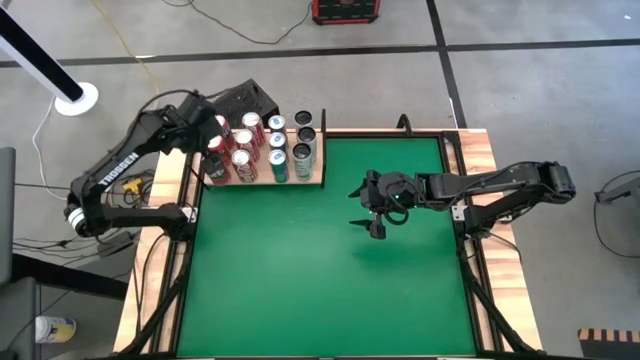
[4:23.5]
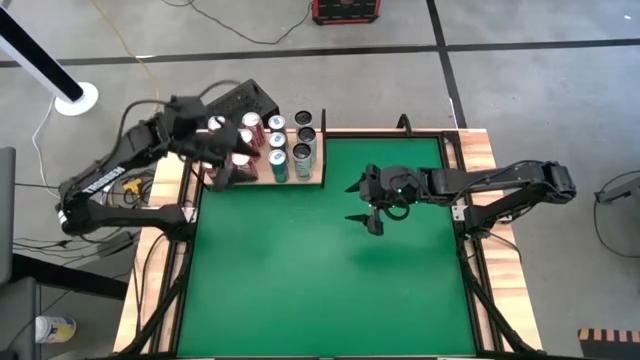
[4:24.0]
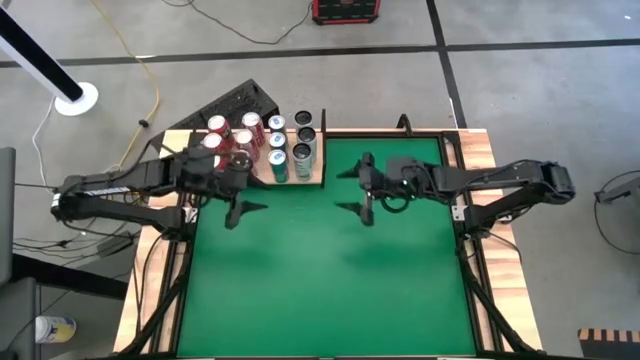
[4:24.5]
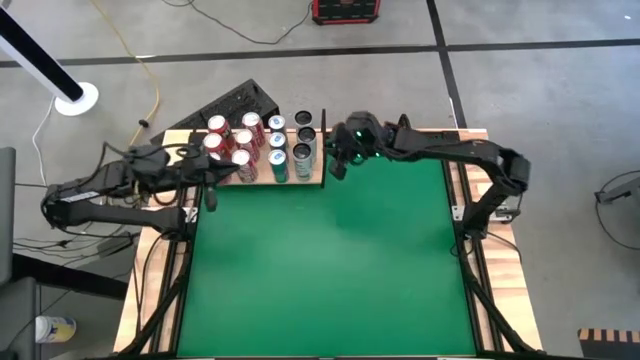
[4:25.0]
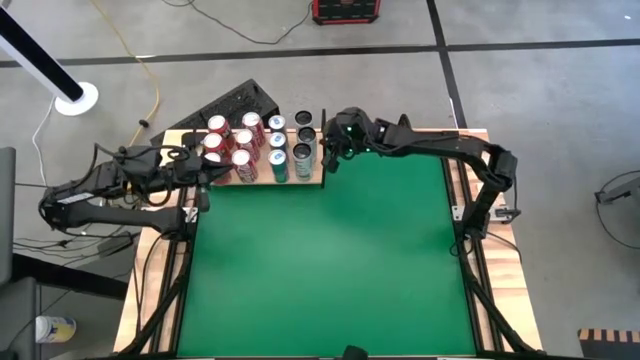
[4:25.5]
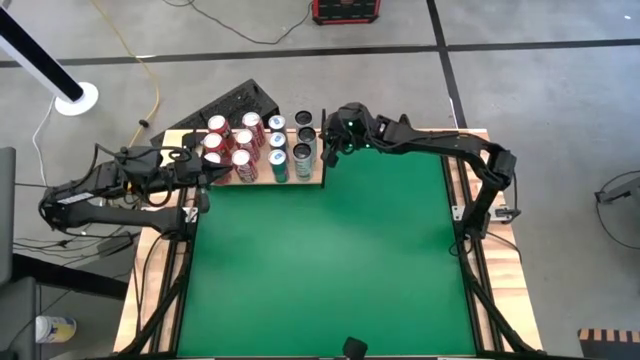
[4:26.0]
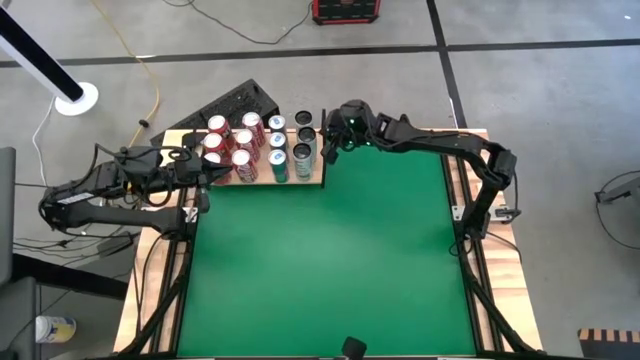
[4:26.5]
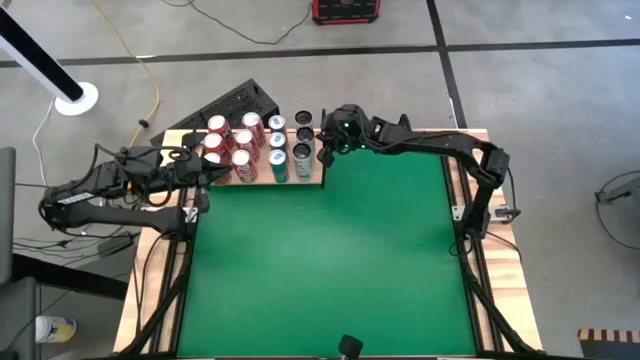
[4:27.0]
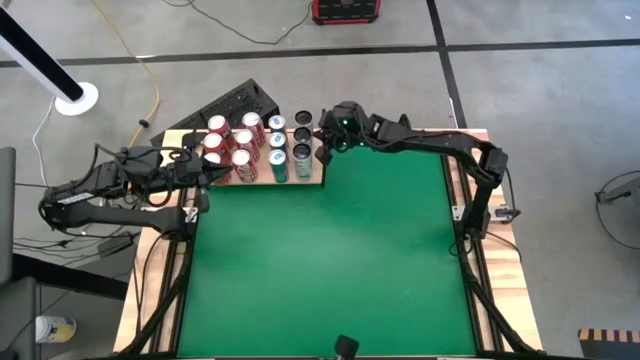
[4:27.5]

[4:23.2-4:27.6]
Task: Place canned beverage on shelf
Adjust the white and yellow soda can on the shelf

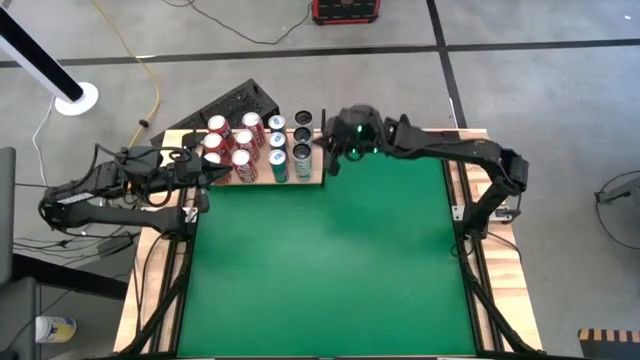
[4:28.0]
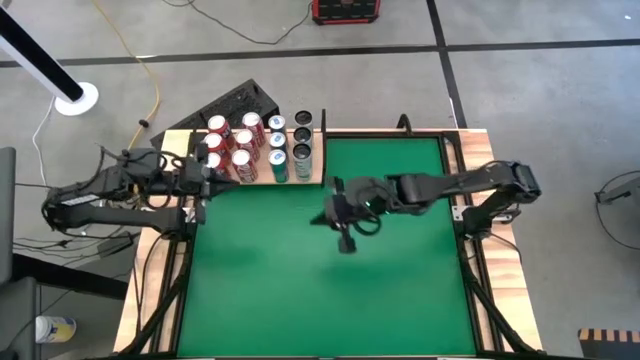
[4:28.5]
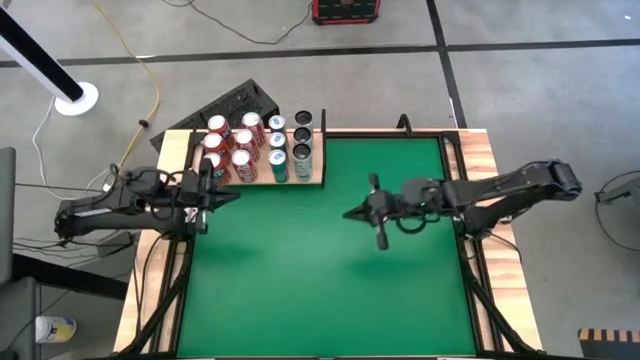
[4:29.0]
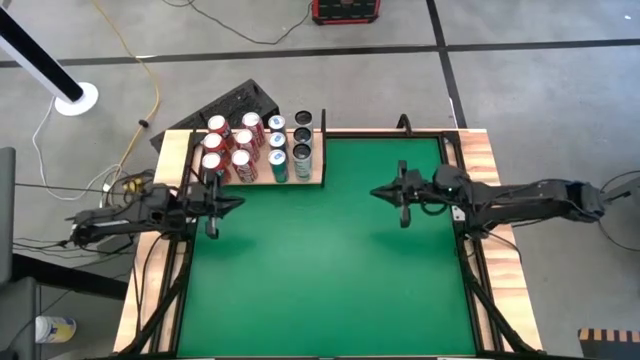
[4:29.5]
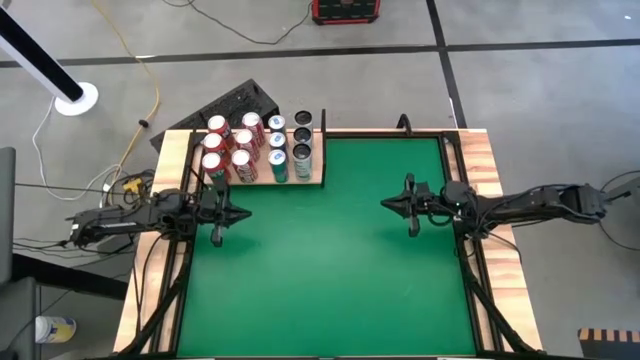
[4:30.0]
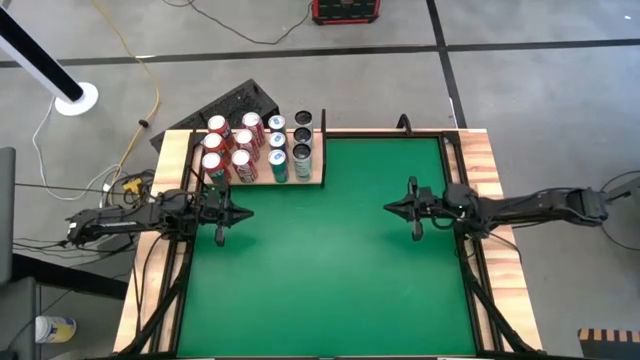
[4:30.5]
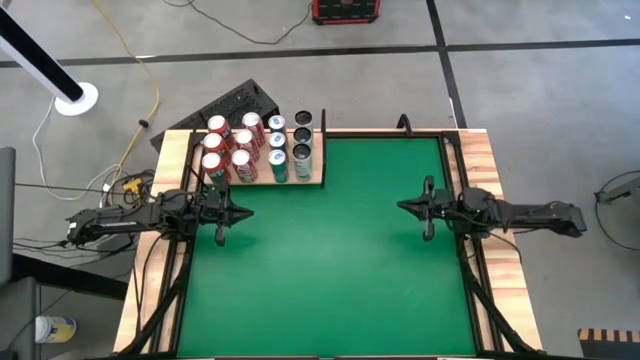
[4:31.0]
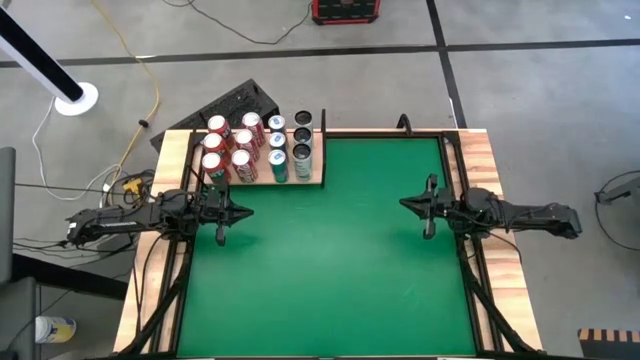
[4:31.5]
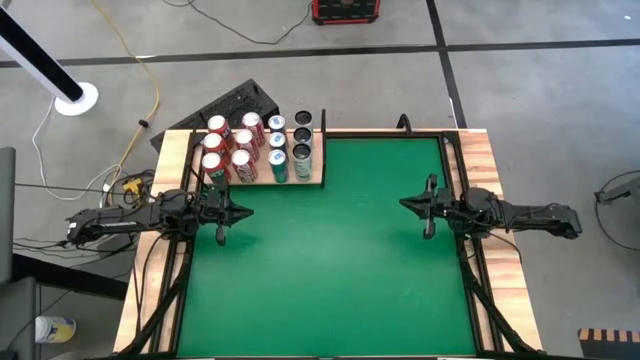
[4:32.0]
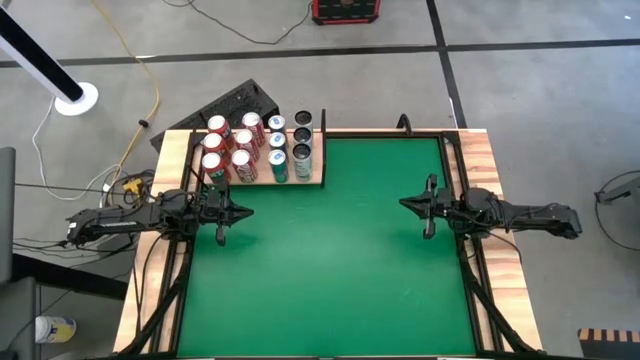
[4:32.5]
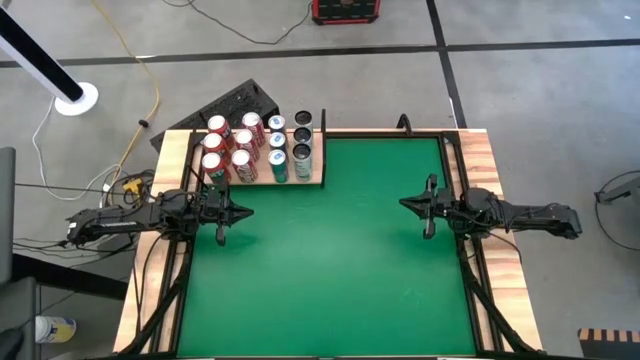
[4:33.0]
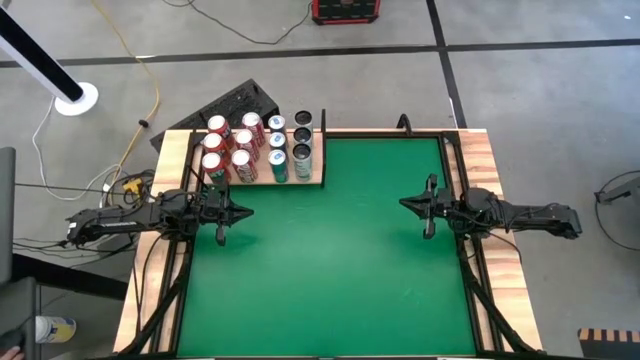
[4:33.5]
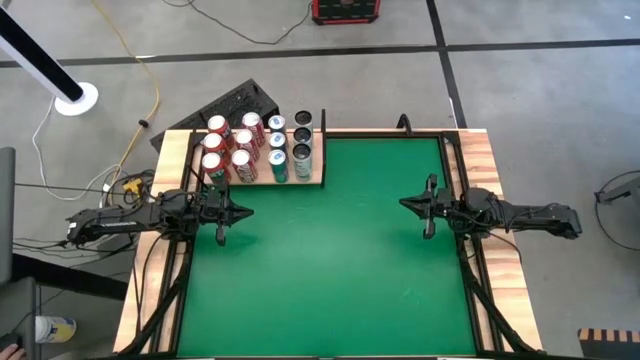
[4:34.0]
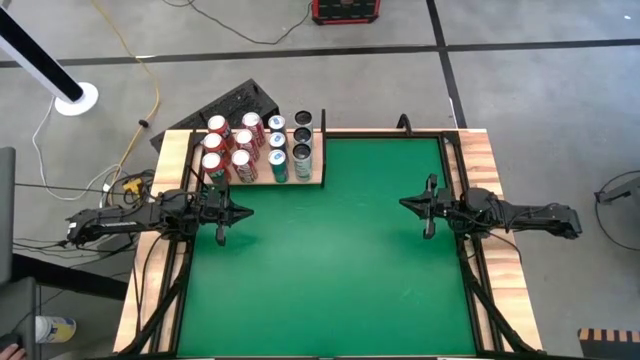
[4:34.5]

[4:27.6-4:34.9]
Return to Home Position

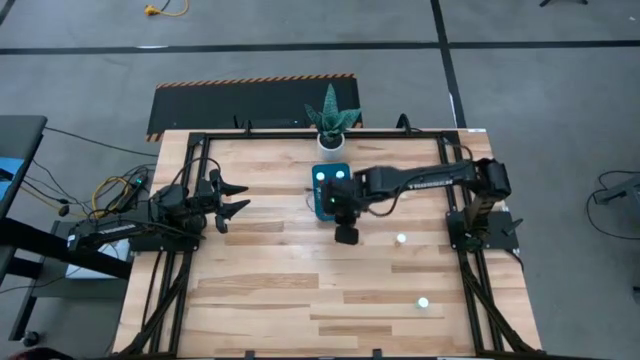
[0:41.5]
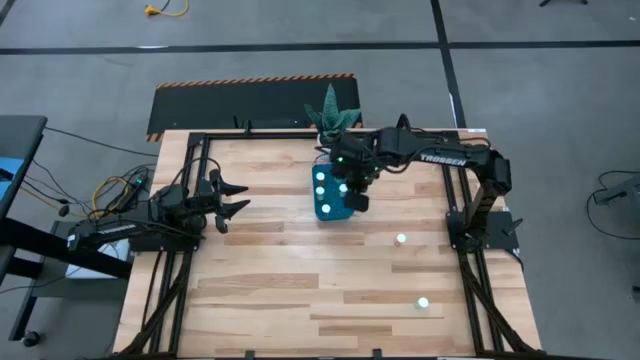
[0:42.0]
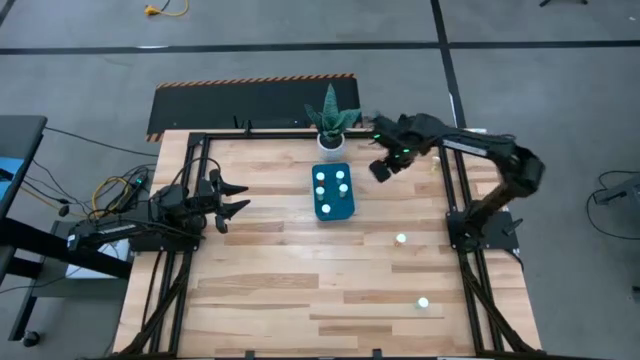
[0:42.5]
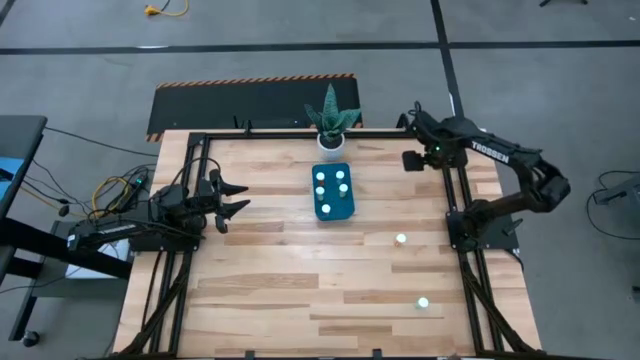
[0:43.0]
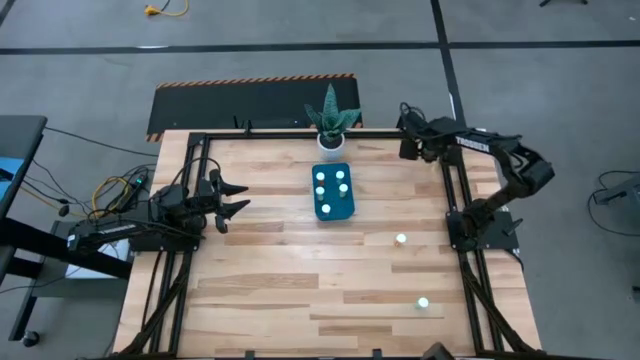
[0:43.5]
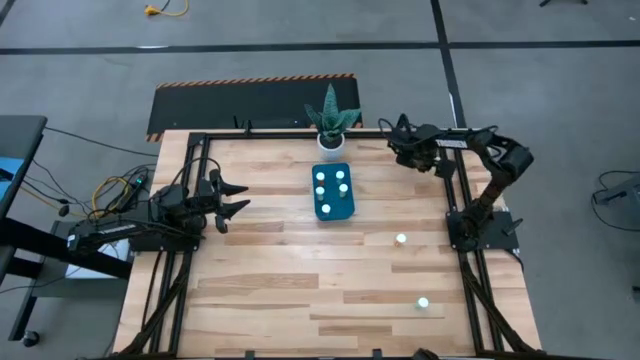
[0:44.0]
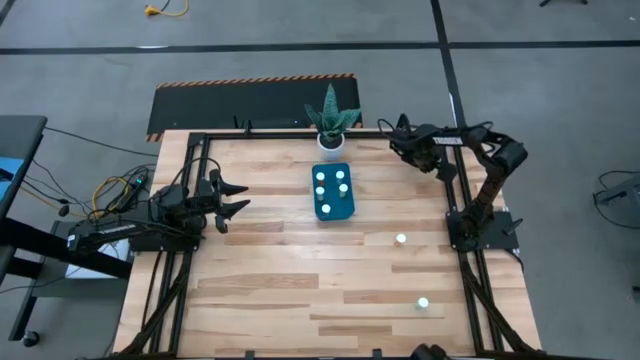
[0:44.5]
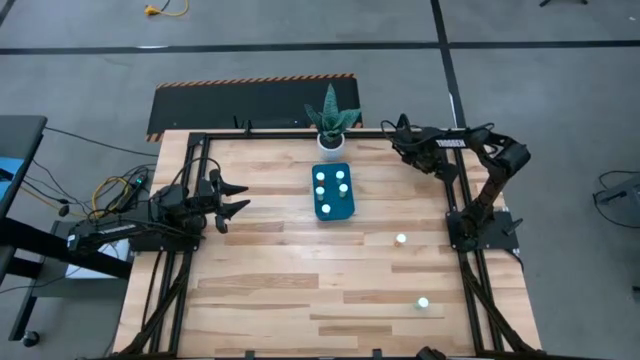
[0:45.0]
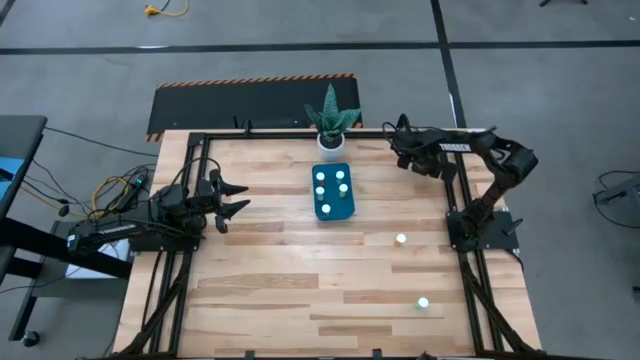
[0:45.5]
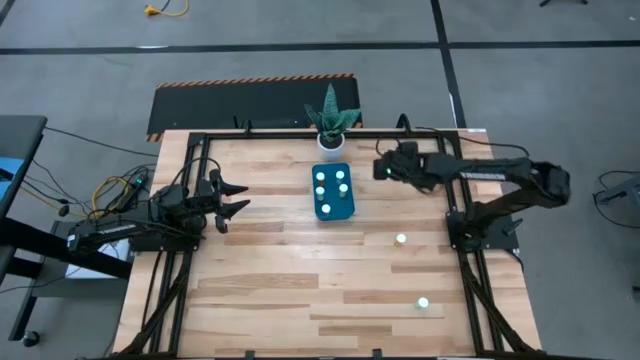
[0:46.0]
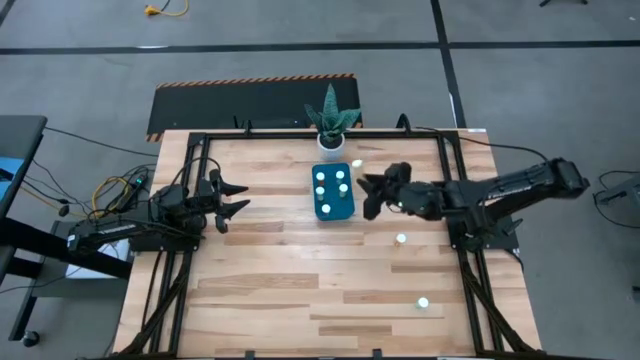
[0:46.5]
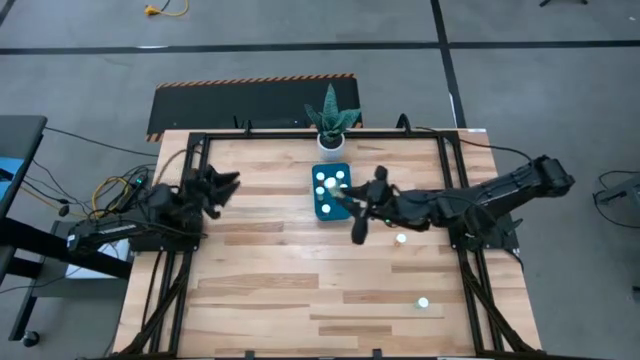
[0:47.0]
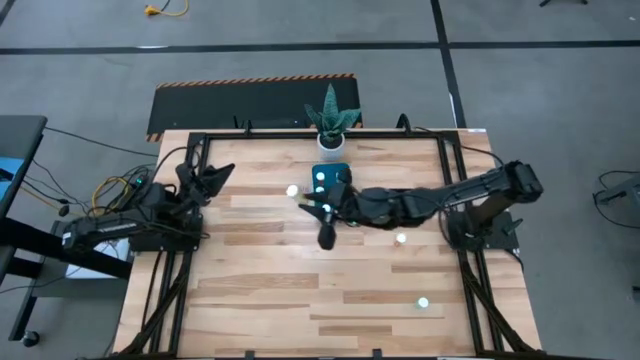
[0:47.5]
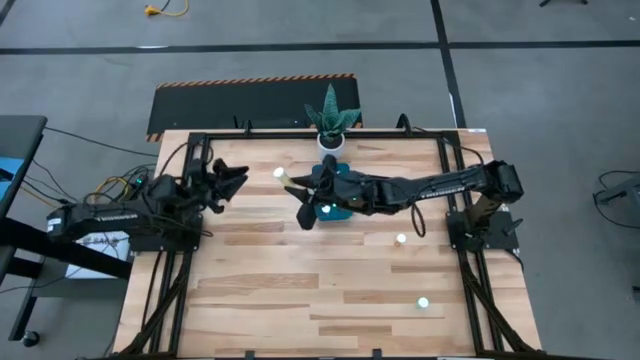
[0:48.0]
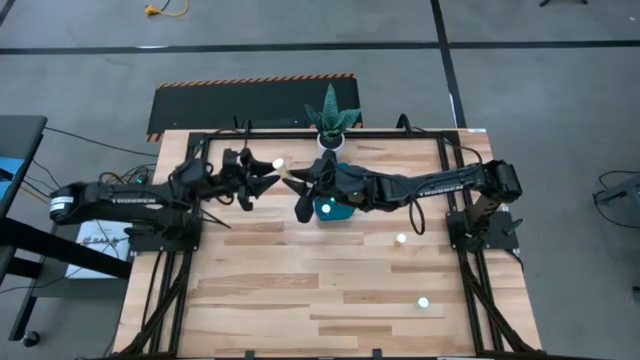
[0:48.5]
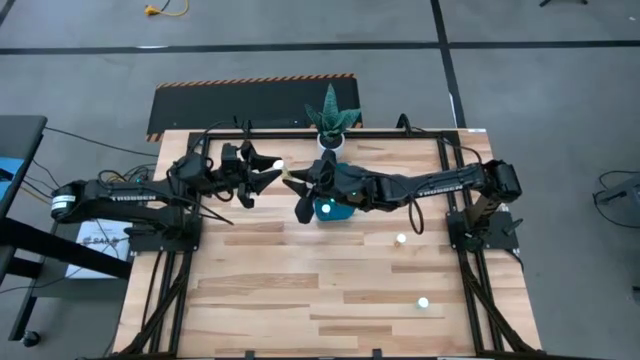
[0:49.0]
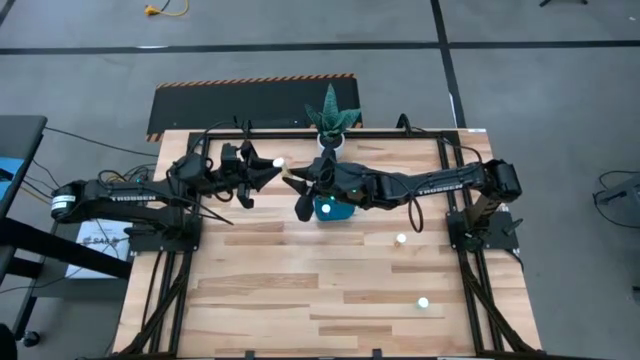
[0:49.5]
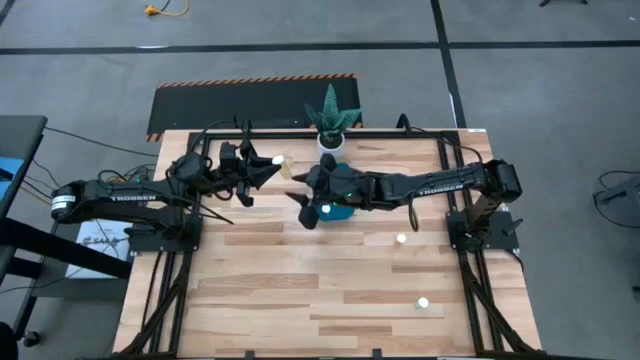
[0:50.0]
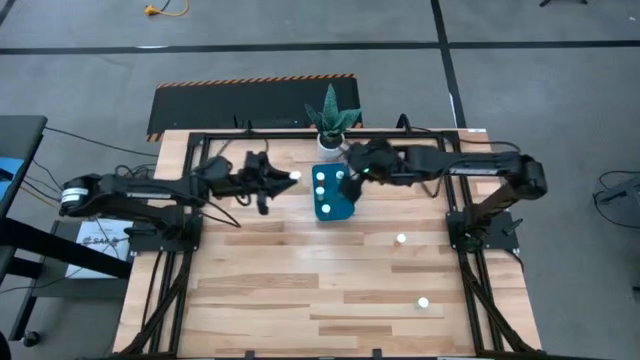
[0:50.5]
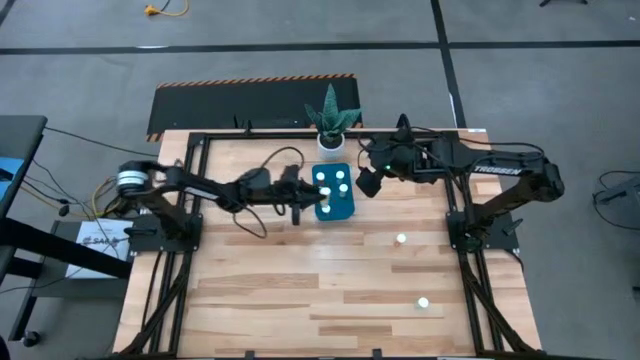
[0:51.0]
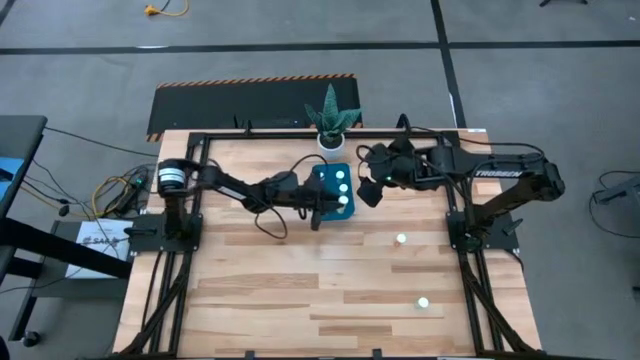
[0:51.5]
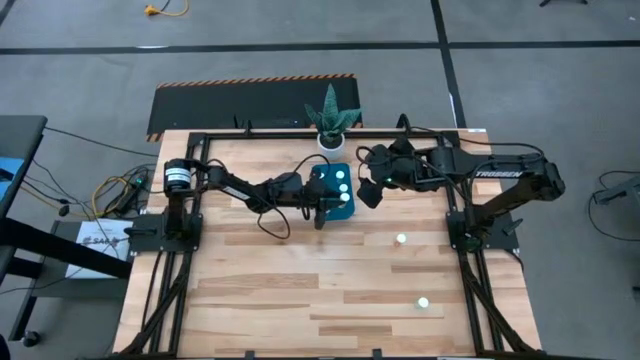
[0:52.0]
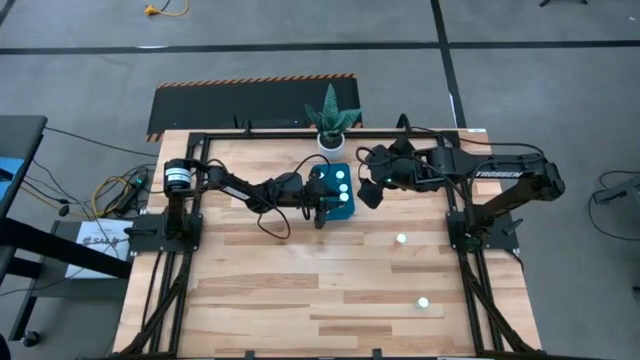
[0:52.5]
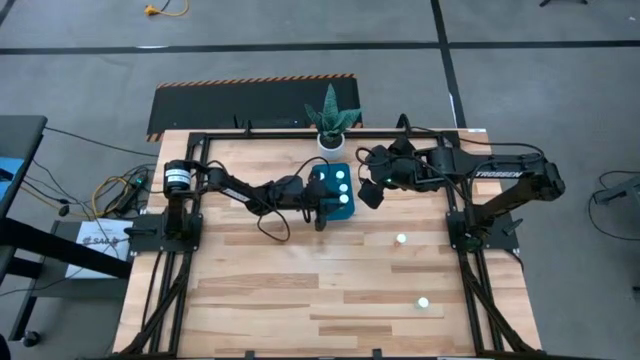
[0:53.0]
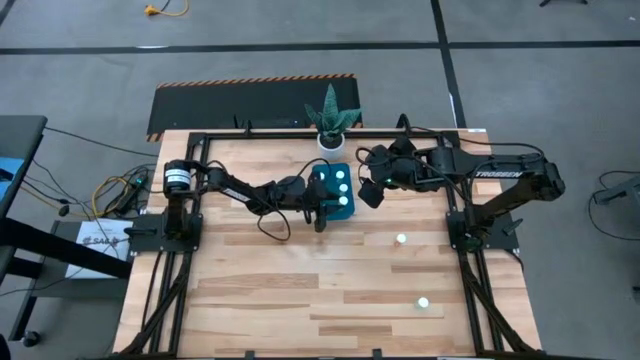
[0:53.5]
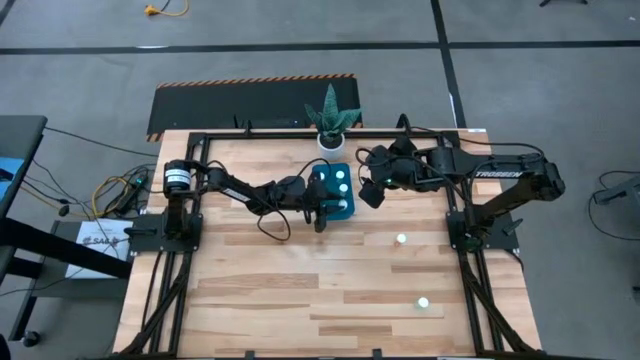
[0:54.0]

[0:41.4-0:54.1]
Task: Pick and place pill bottles into a basket
Put the yellow pill bottle into the blue container
